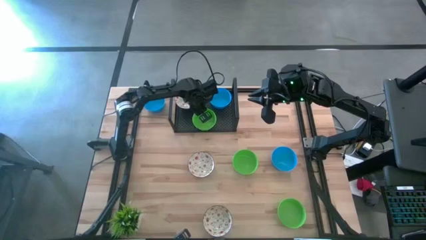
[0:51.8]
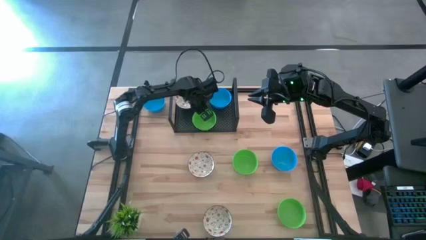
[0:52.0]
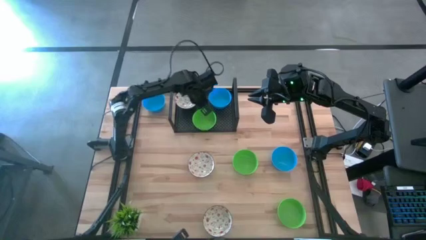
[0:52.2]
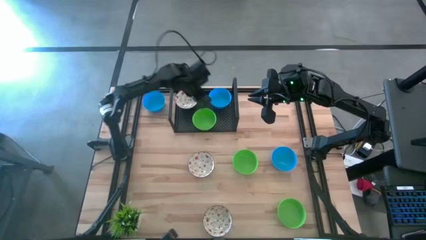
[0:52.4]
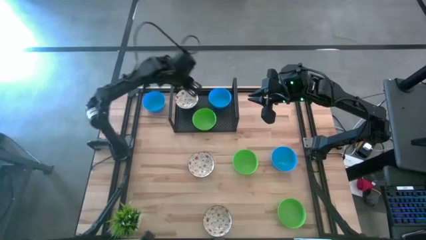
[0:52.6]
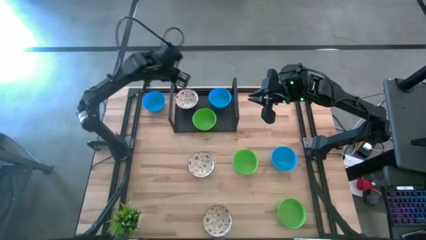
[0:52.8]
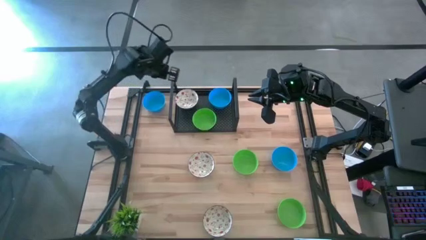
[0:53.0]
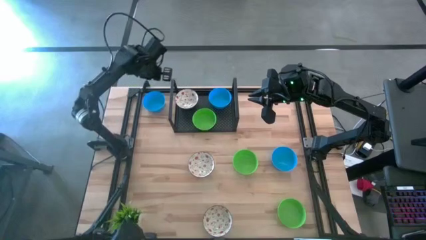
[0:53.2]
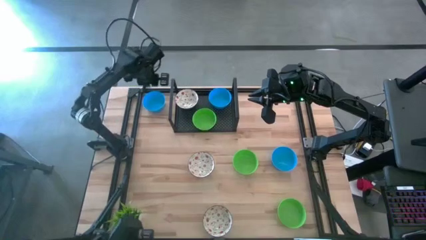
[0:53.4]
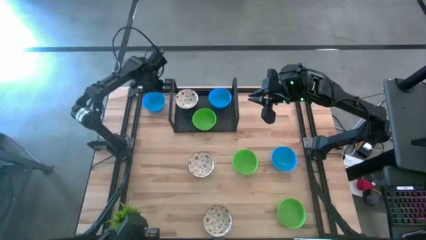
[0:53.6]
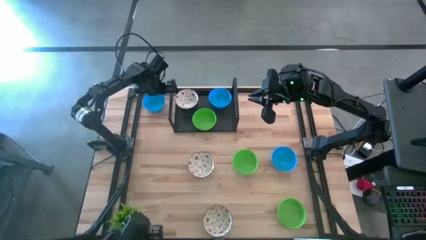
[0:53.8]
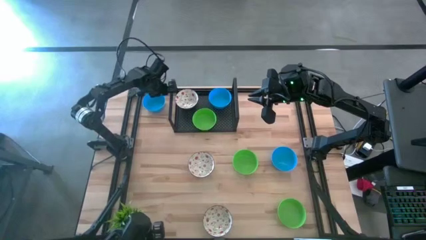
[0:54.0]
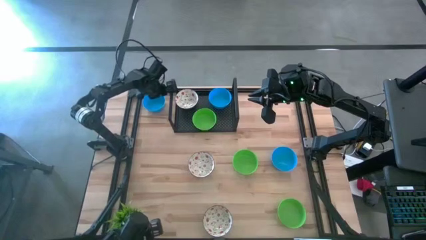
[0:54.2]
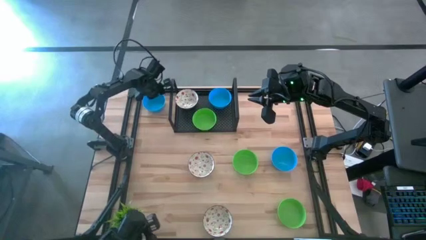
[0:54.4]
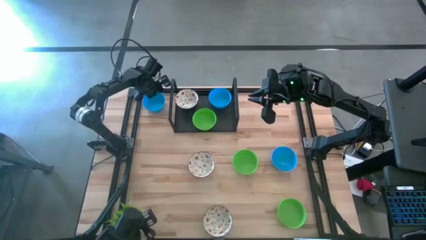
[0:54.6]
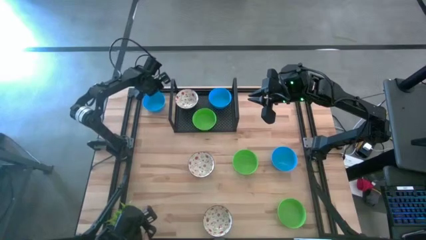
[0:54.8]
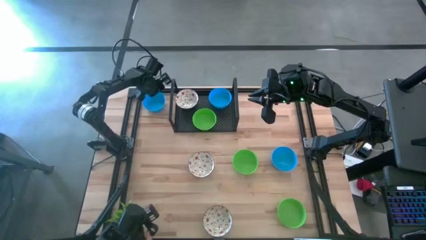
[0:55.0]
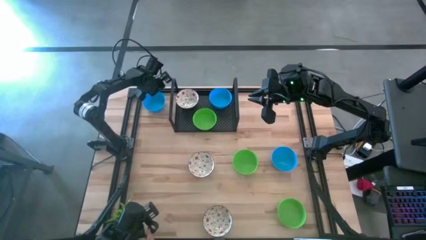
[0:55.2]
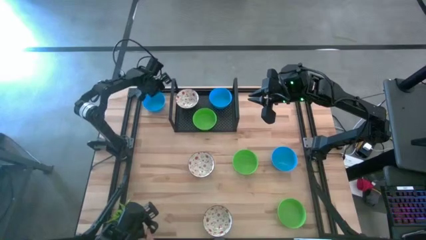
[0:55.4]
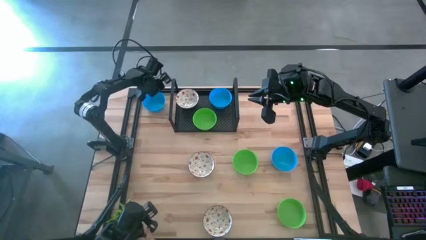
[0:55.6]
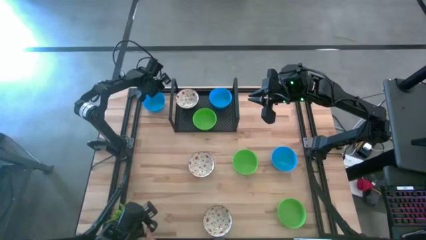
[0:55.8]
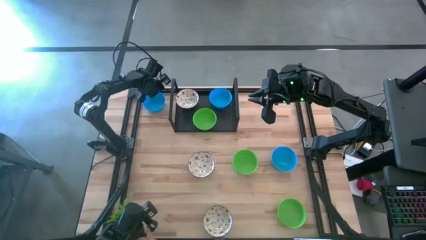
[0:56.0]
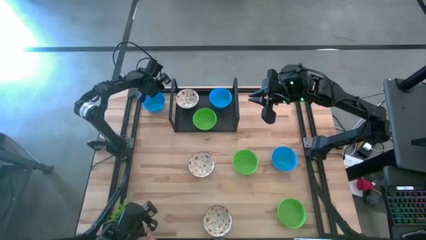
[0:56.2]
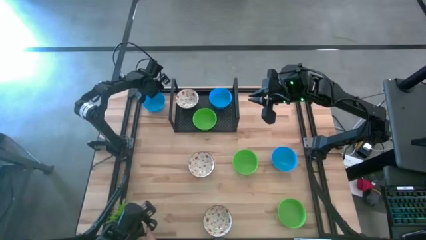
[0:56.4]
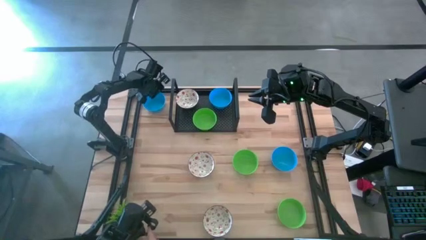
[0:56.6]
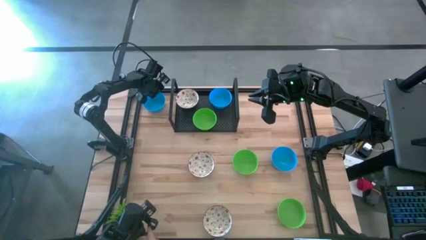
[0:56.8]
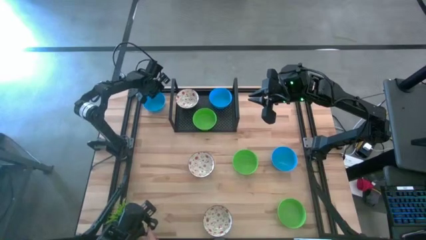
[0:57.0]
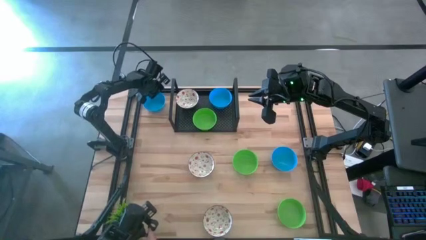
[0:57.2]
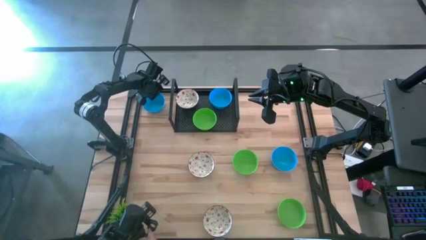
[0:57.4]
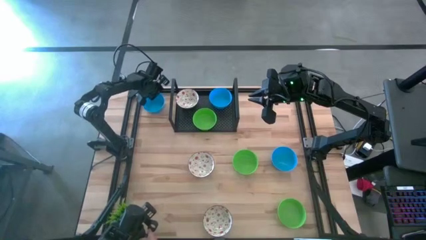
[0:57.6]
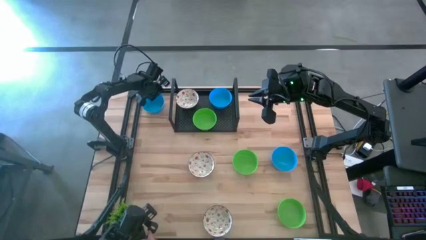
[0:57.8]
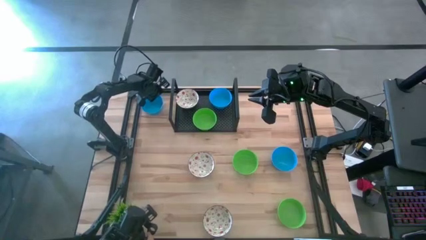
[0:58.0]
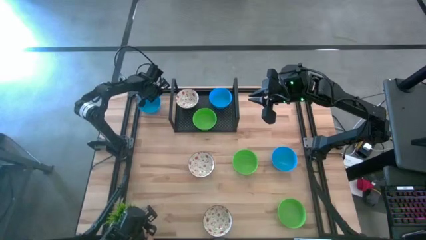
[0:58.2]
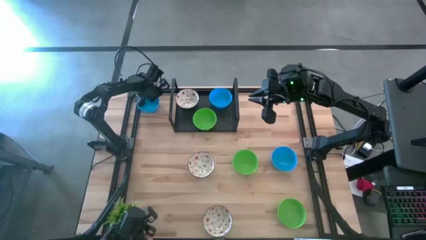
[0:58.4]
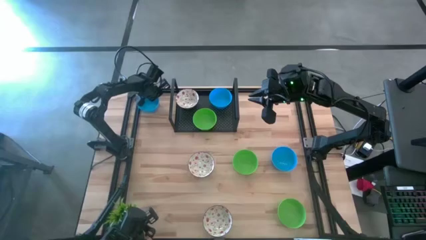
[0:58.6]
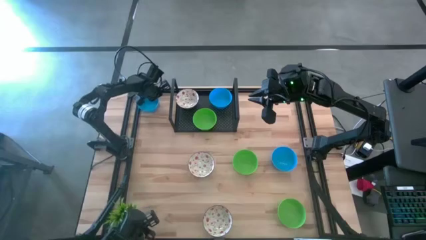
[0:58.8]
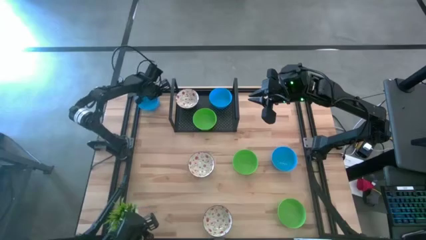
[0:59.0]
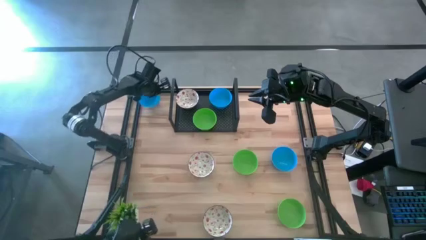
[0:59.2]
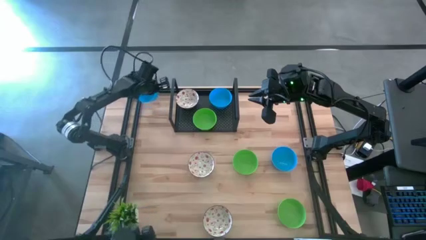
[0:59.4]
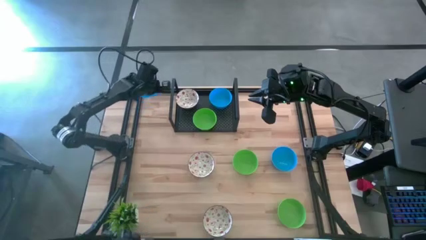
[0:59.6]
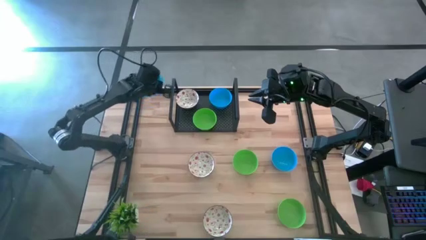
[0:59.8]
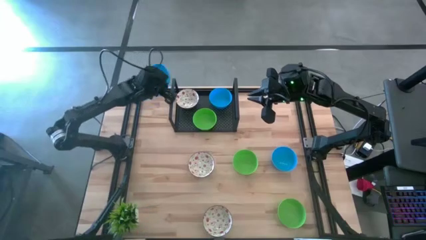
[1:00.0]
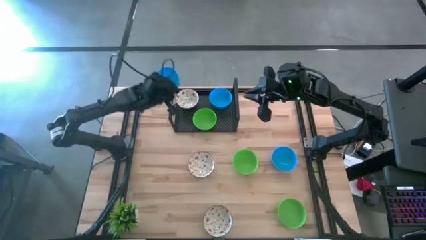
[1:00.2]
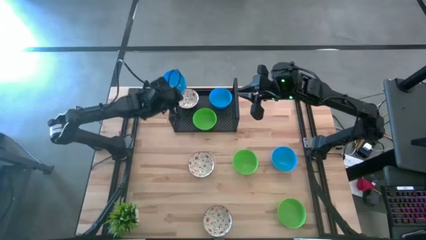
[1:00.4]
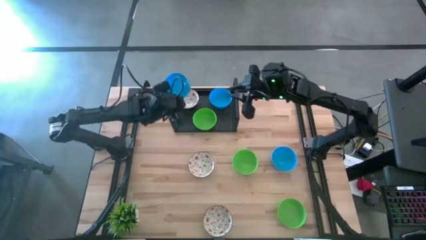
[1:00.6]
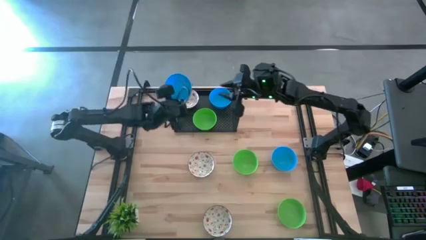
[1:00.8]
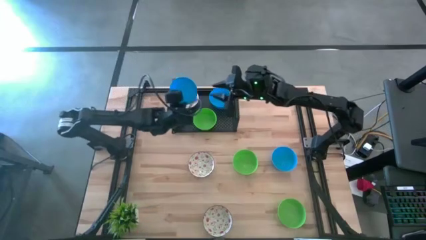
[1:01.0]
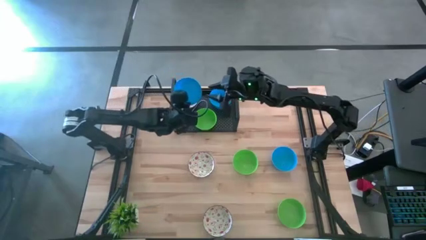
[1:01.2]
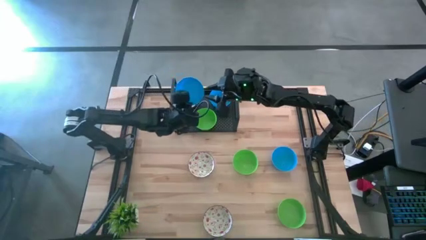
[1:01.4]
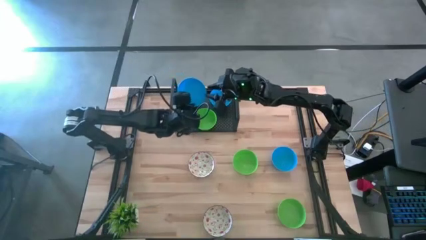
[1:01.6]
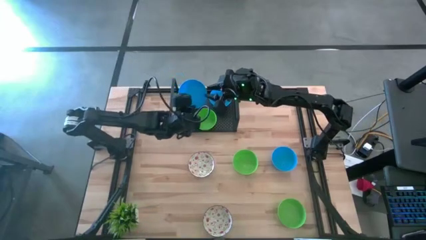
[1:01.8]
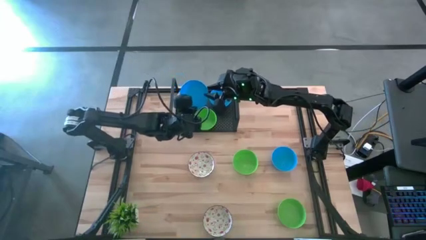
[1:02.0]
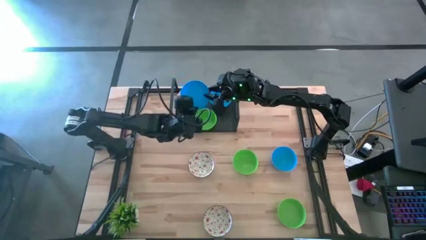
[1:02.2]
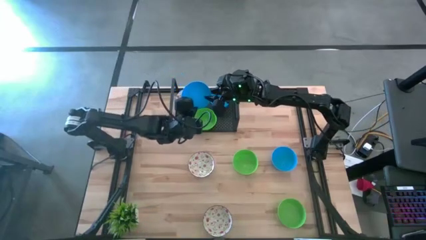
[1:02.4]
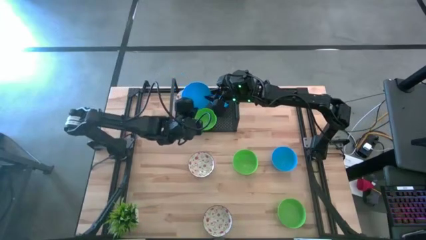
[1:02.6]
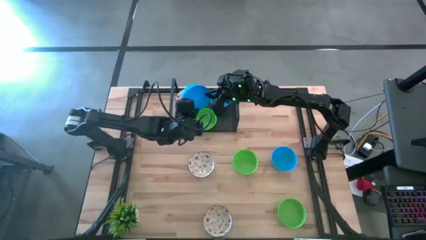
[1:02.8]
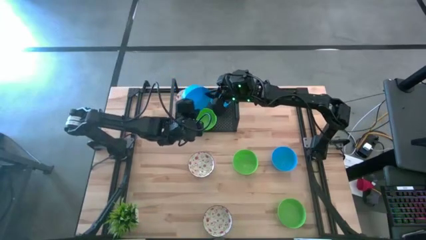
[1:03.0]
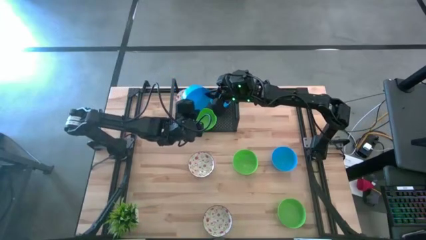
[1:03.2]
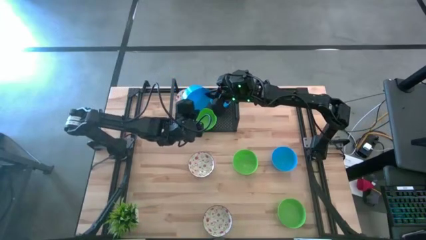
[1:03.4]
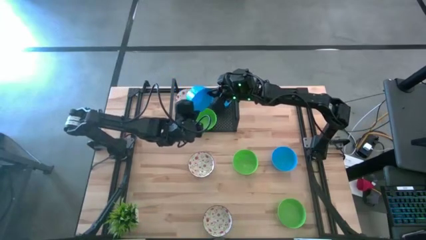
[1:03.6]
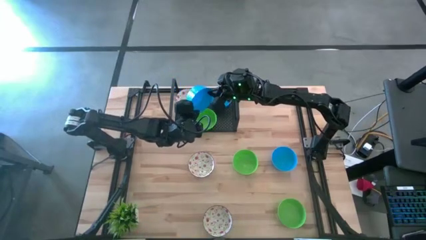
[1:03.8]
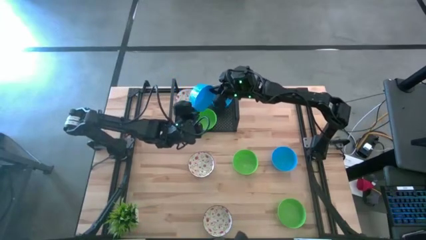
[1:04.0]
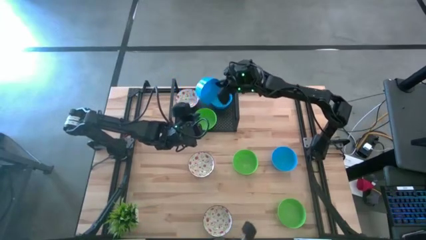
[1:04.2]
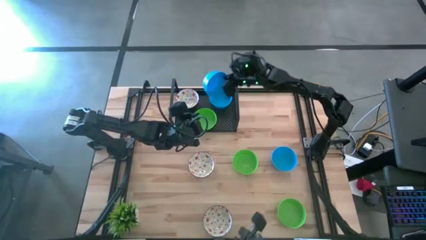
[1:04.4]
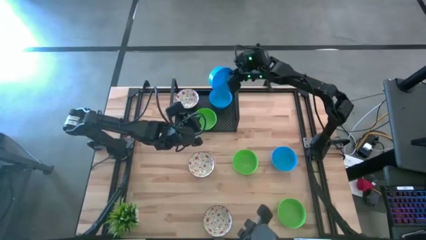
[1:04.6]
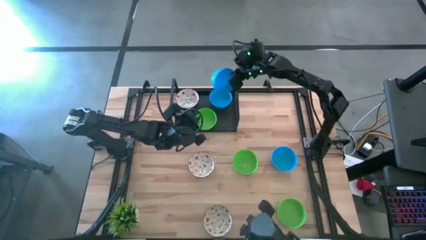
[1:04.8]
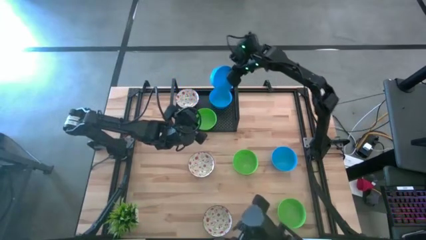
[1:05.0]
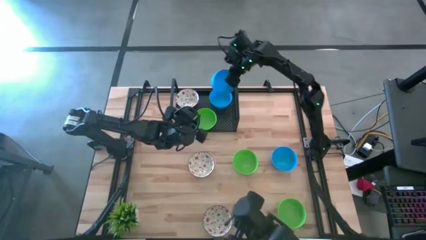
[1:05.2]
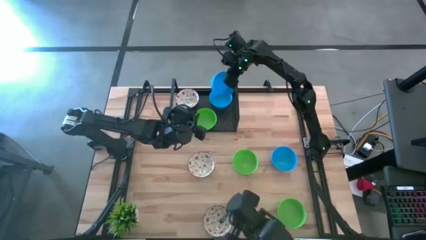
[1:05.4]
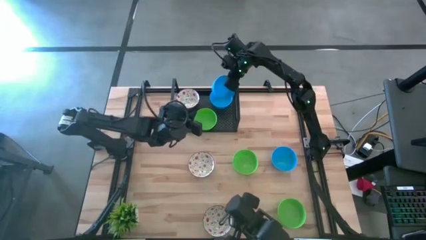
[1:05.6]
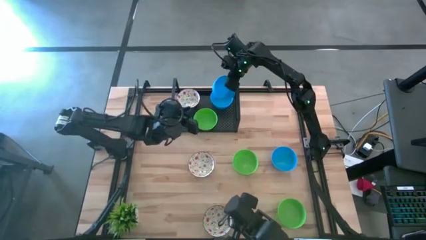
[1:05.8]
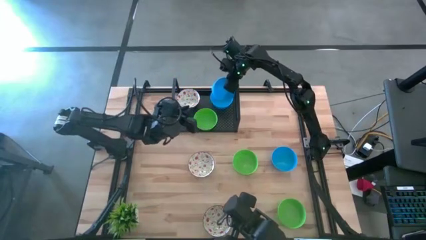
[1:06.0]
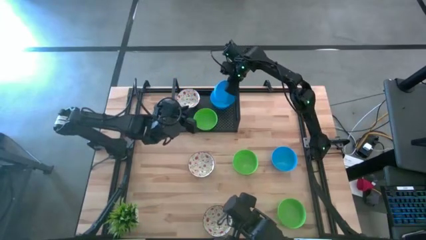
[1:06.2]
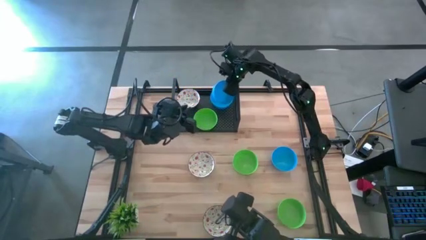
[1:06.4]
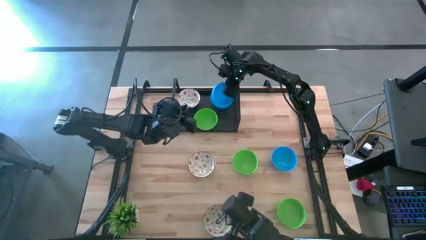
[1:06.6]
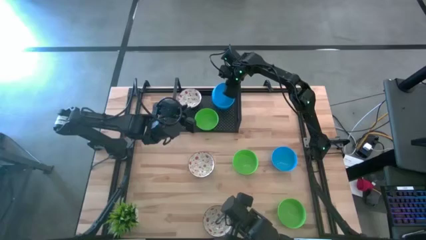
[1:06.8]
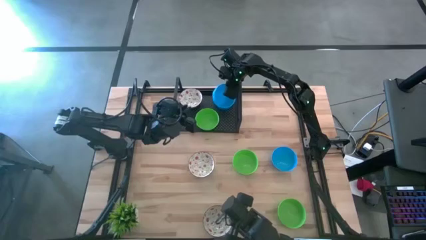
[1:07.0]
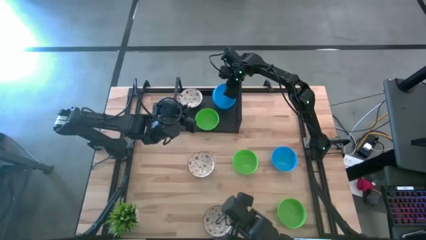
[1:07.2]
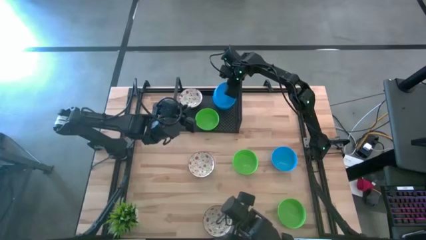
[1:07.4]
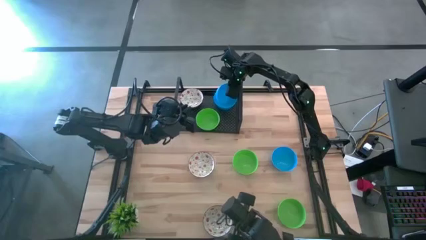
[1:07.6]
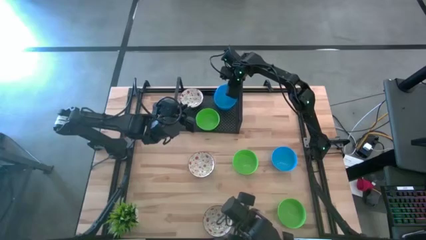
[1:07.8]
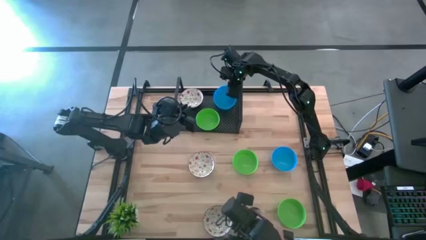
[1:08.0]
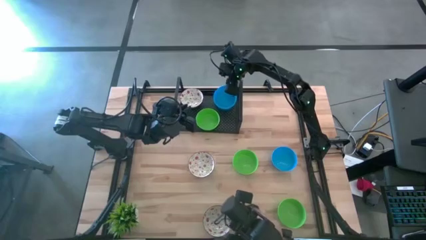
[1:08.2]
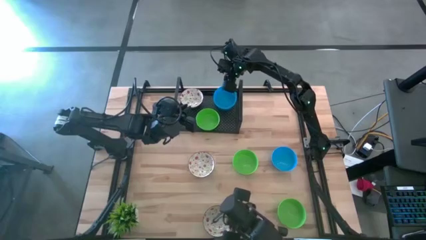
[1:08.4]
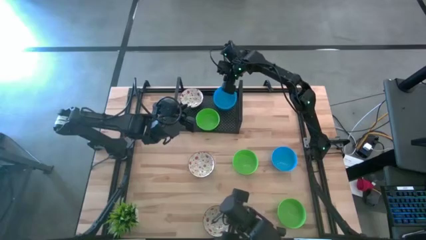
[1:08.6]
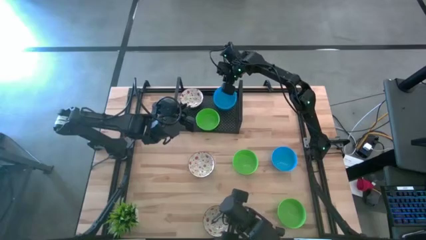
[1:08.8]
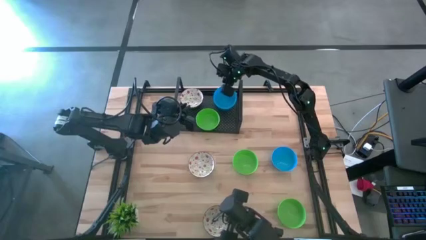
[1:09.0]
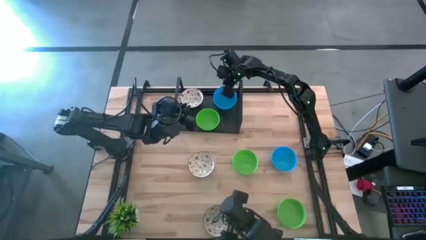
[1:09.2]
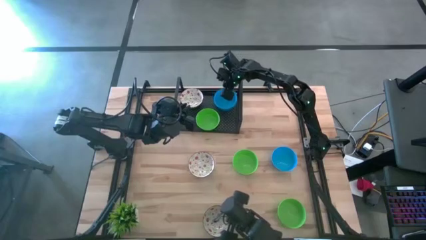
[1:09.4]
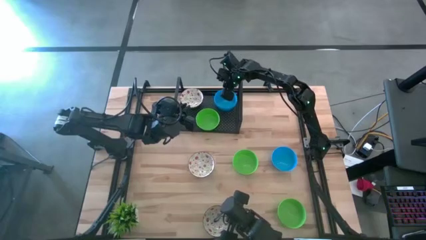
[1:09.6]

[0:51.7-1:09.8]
Task: Pick & Place Mini bowls
Stack the top blue bowl on top of the blue bowl on the shelf
